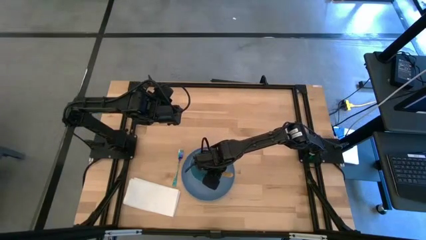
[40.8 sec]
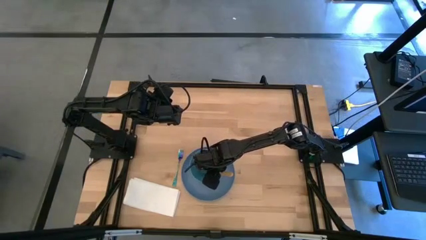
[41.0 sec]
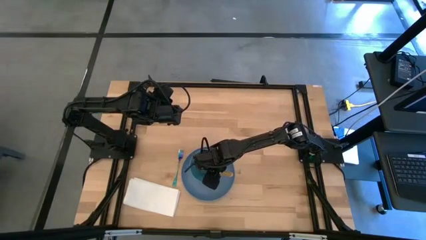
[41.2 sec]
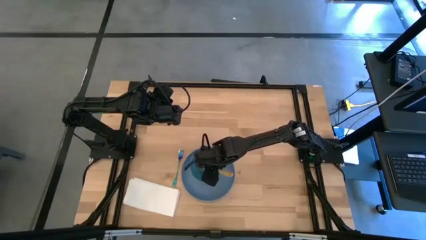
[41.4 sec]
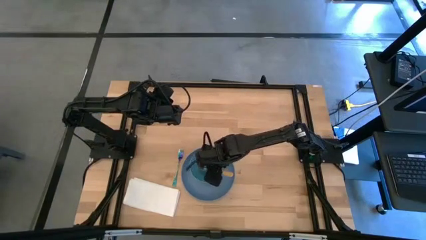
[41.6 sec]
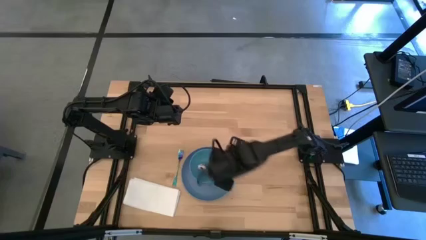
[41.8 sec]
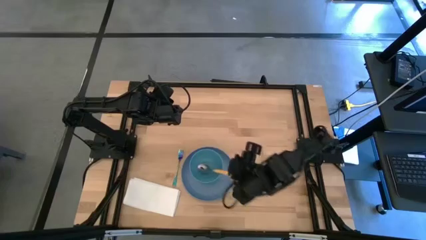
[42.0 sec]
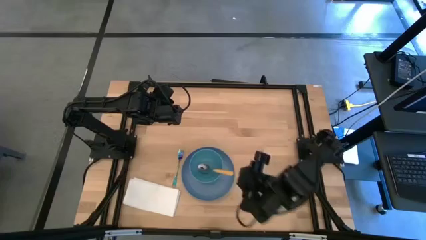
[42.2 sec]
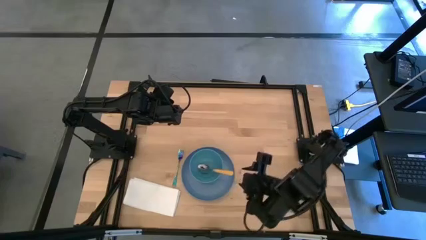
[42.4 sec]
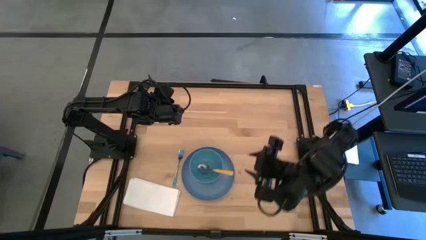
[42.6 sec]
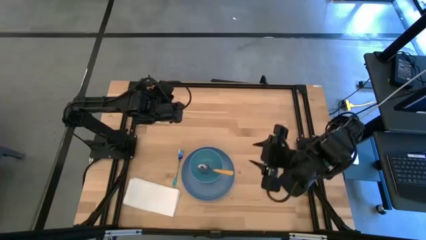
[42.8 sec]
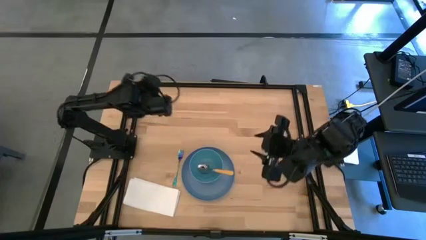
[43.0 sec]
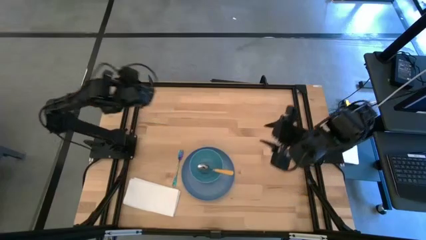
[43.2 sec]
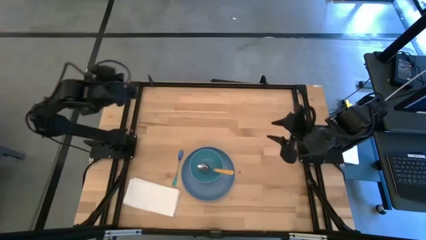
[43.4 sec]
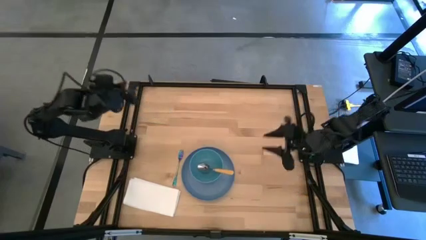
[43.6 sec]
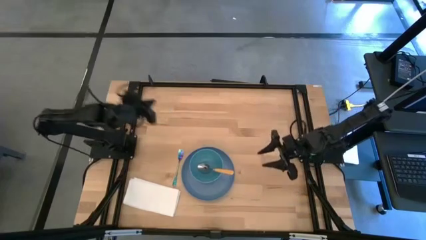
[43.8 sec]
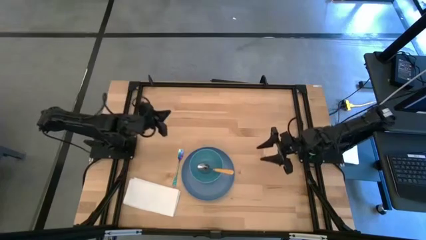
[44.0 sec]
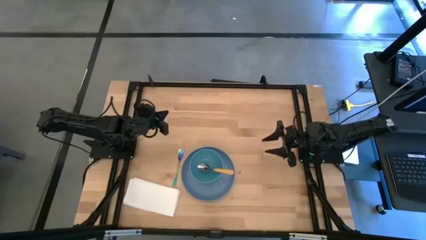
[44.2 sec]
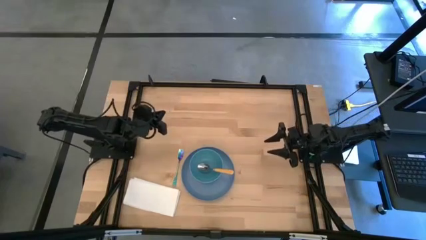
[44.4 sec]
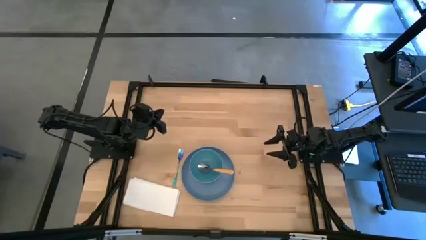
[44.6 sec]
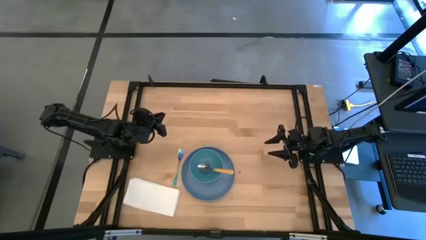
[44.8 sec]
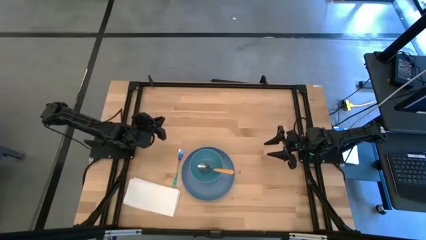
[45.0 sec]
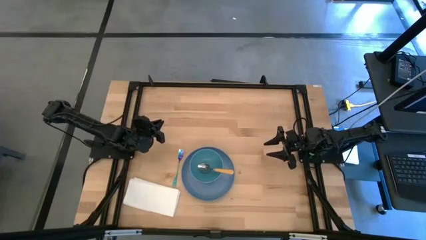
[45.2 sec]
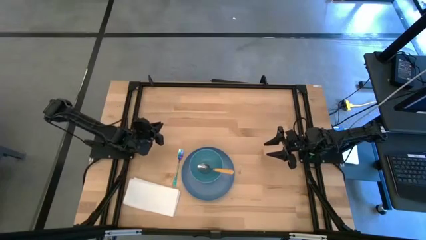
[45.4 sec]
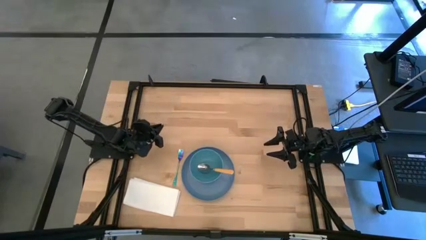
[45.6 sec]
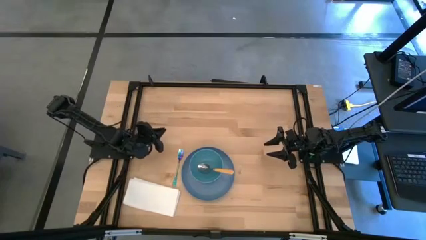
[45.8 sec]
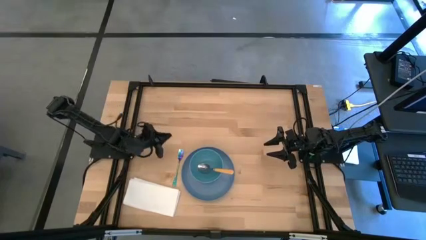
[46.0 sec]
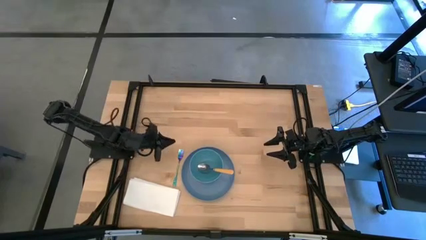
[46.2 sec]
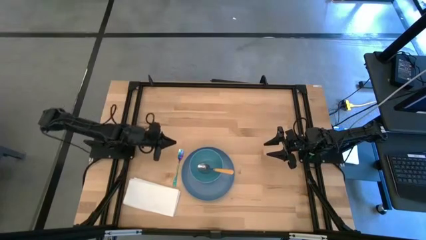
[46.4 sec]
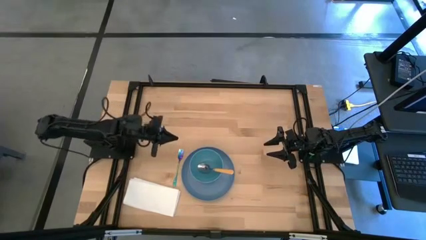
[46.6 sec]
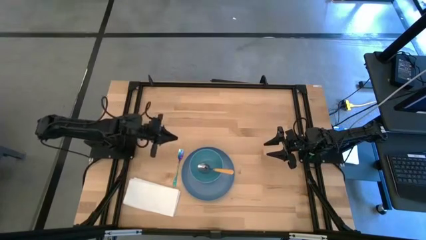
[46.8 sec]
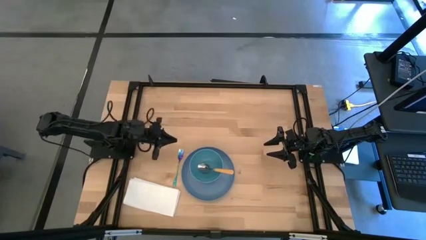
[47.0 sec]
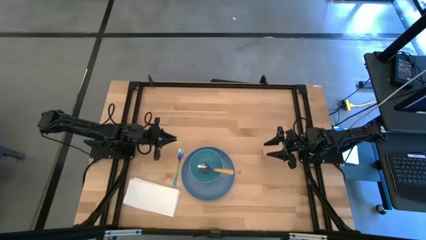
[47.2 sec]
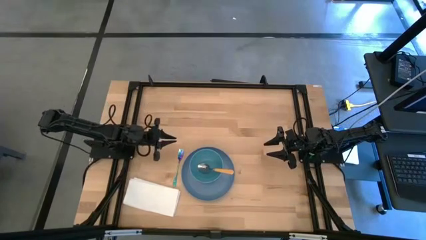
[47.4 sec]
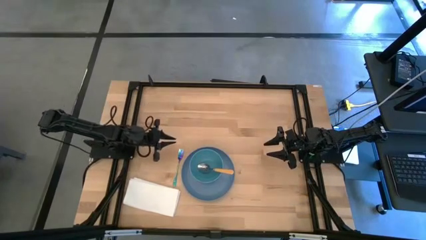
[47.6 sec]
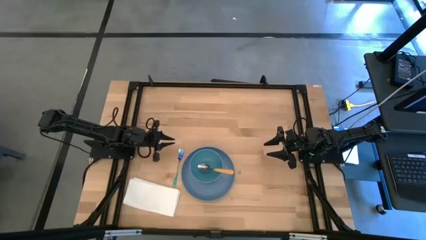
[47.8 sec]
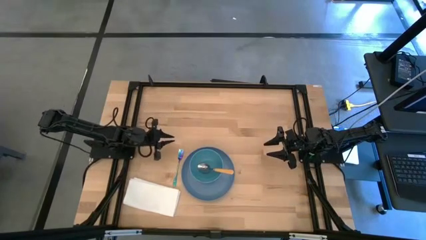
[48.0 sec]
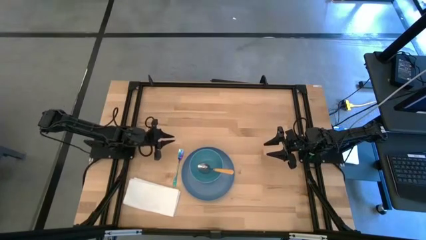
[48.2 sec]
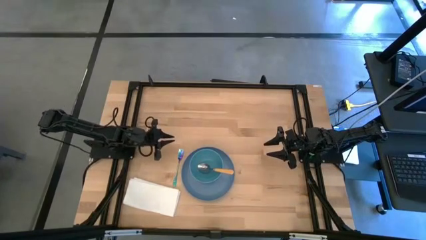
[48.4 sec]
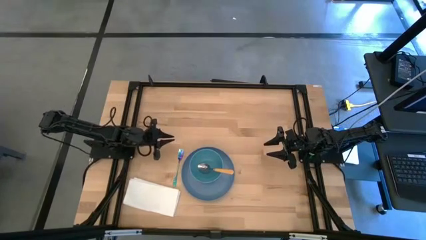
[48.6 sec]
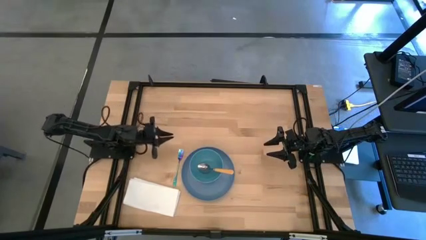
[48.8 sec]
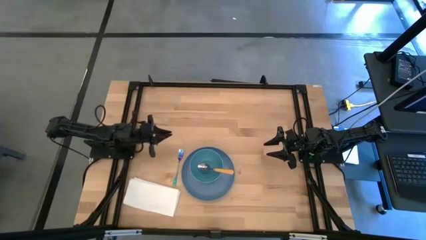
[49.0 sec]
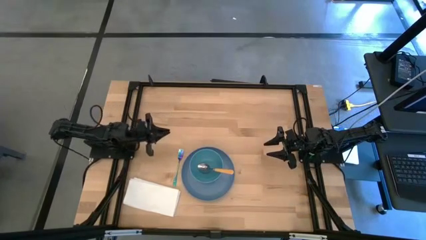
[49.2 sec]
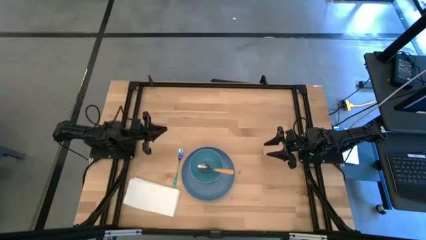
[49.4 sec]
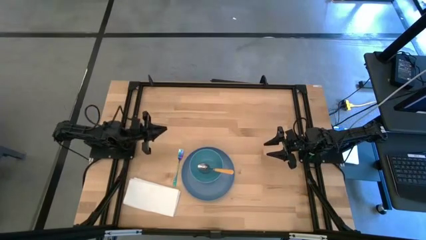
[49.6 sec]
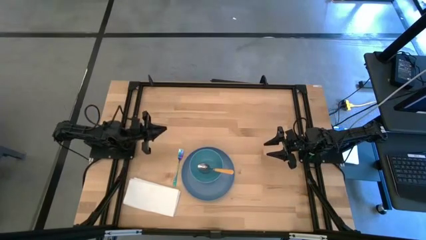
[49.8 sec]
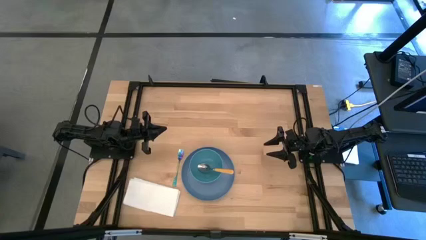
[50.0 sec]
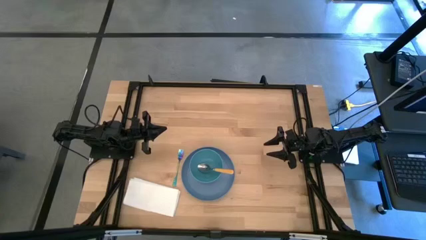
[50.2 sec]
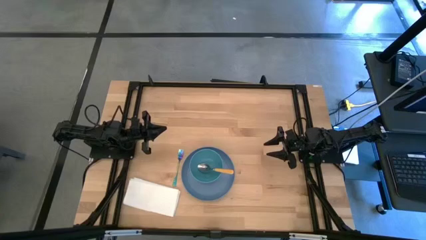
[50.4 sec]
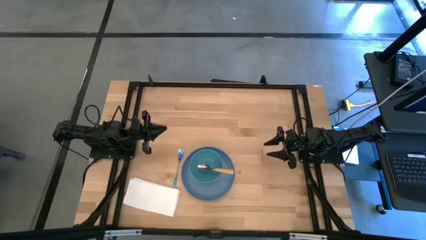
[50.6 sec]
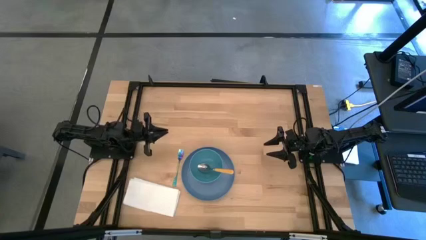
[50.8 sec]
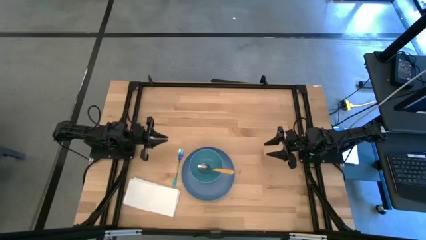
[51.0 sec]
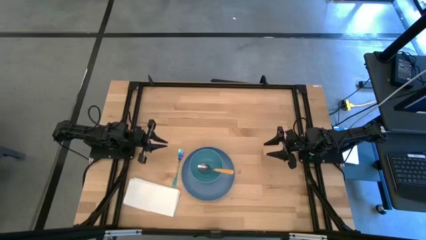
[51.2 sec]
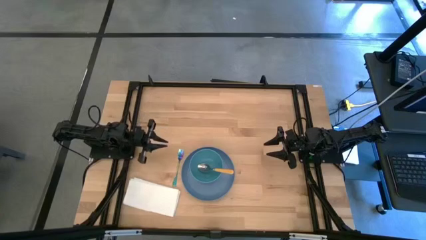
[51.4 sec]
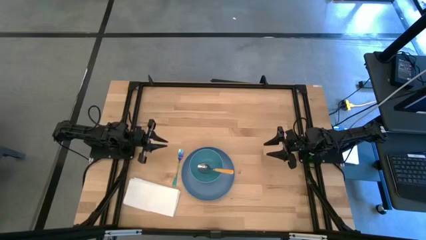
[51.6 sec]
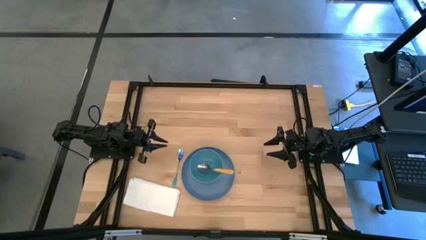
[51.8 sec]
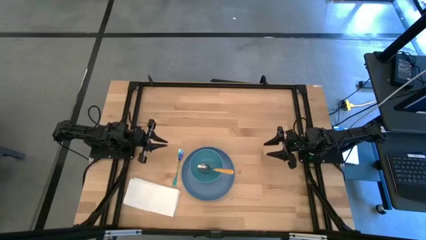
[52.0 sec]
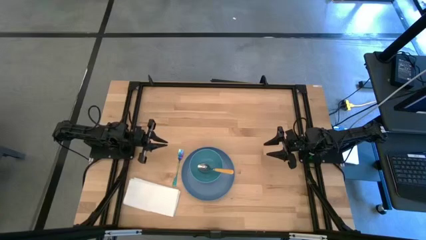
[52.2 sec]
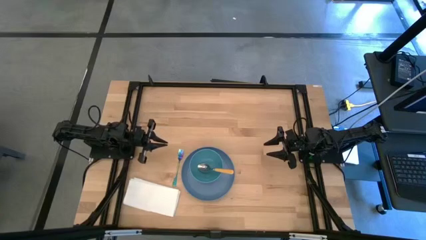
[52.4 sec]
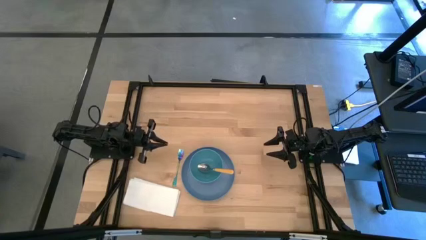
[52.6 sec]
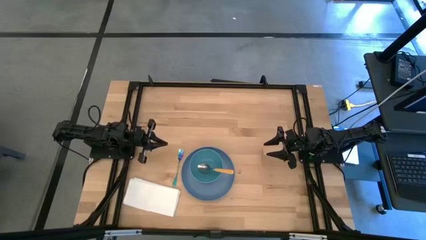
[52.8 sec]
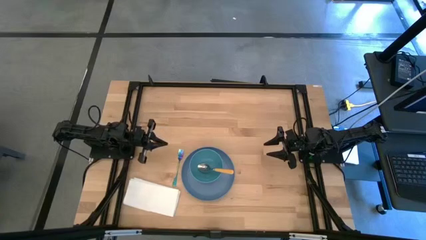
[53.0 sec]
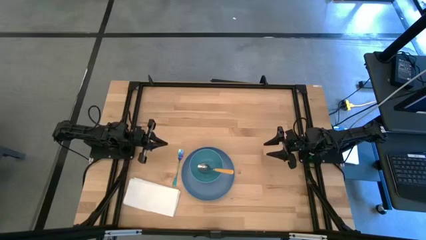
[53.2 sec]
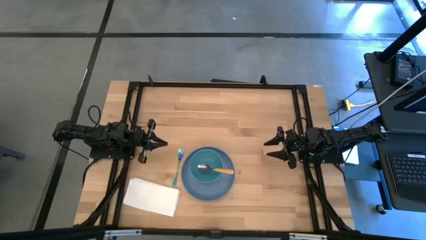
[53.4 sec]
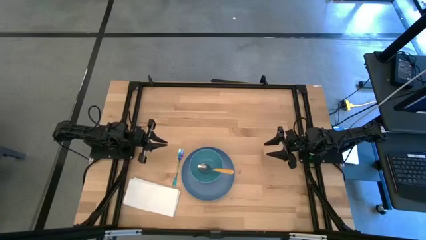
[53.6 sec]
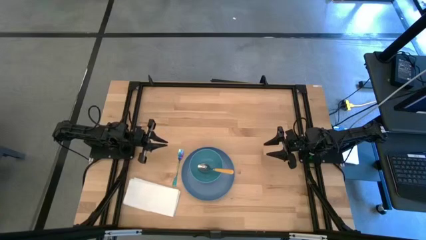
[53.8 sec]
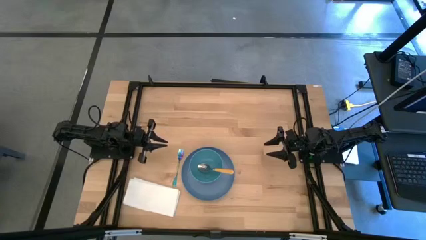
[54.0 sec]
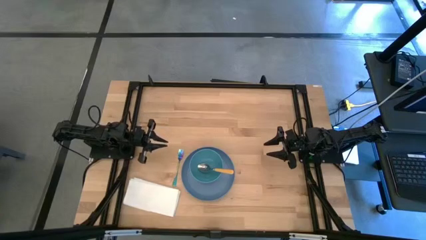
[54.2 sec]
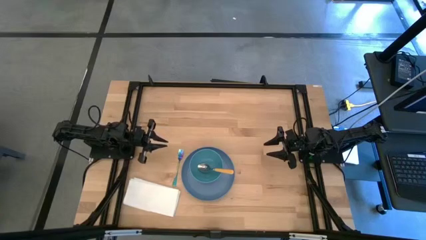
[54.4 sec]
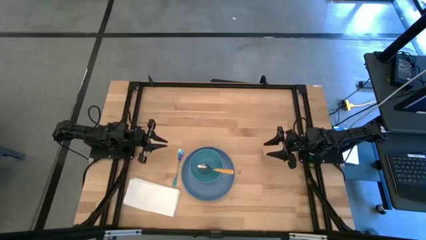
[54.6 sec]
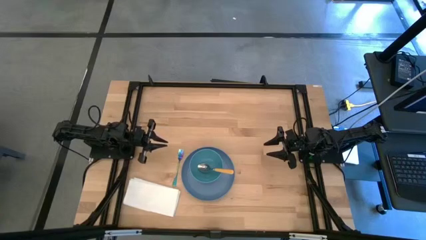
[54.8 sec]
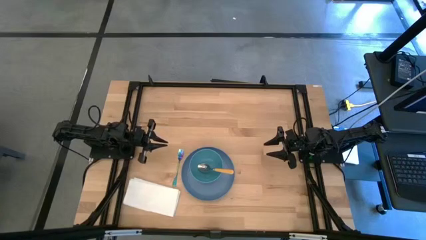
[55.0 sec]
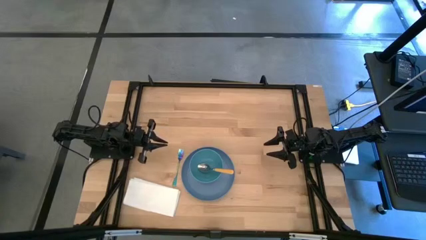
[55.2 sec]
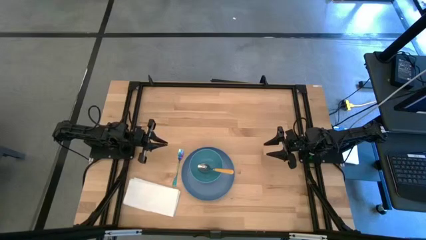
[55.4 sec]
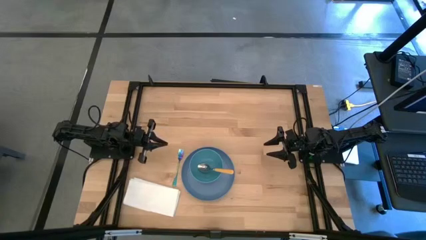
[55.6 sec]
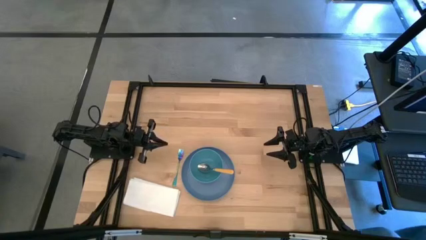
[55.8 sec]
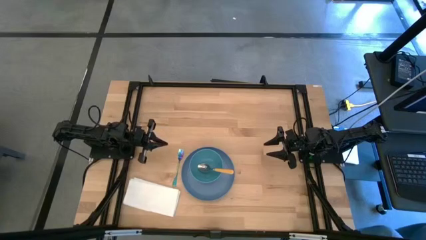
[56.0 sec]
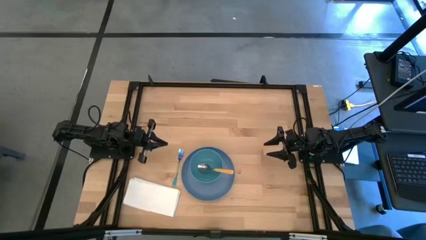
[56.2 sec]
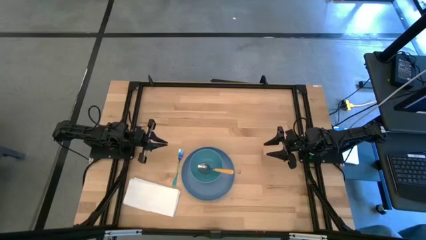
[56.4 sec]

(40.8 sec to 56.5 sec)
Task: Set table place
Return to Home Position
